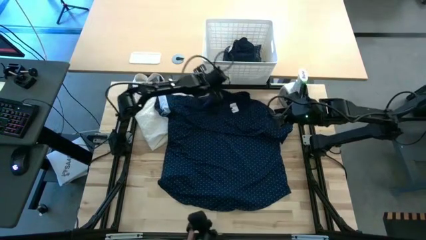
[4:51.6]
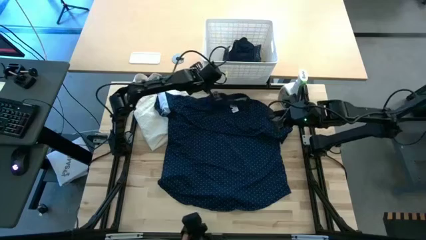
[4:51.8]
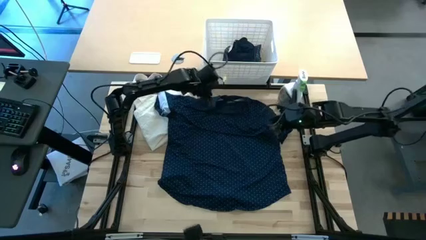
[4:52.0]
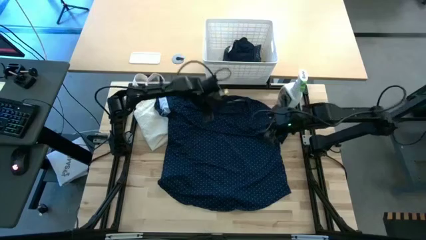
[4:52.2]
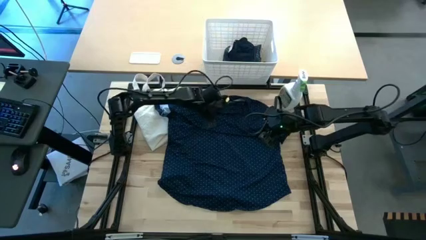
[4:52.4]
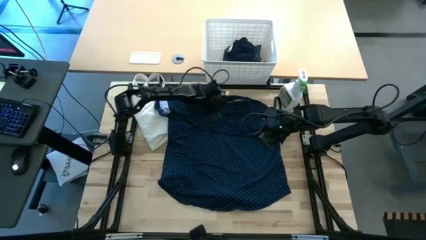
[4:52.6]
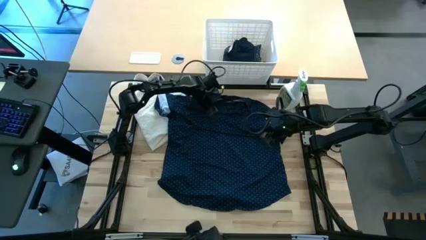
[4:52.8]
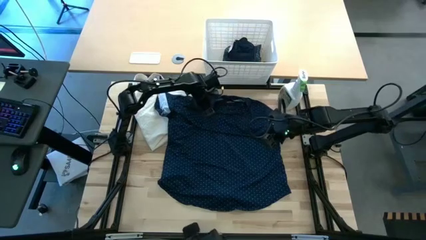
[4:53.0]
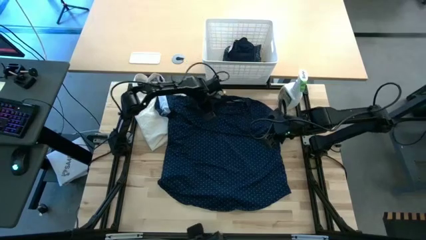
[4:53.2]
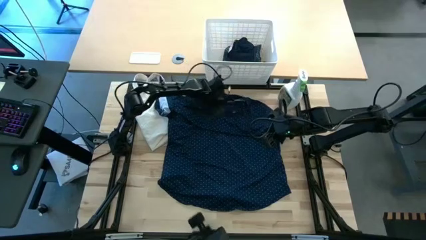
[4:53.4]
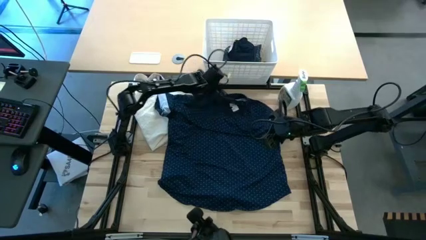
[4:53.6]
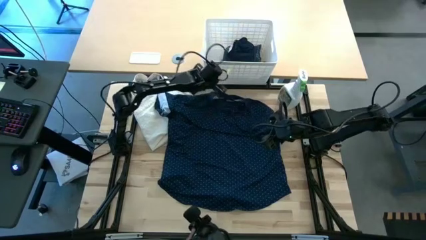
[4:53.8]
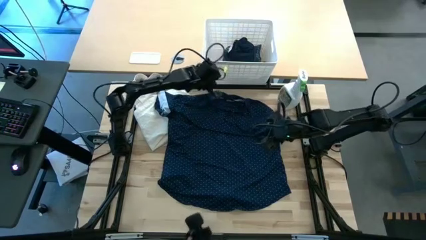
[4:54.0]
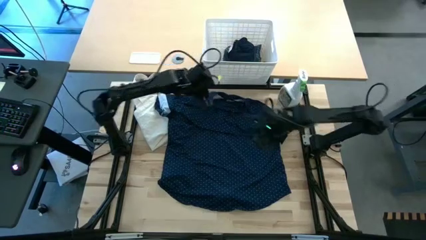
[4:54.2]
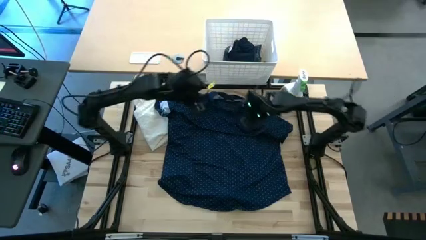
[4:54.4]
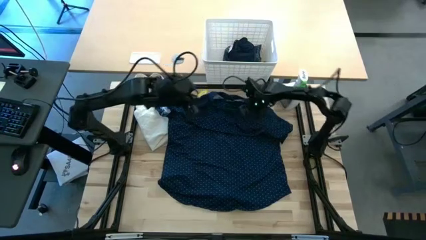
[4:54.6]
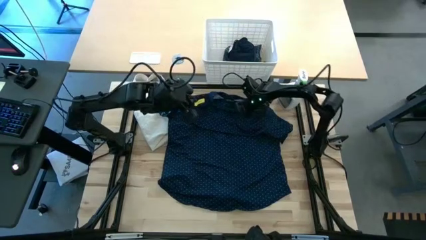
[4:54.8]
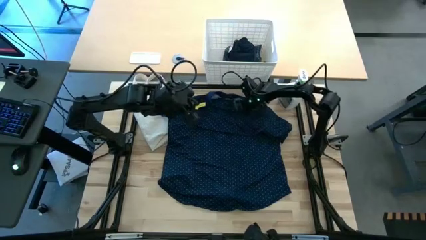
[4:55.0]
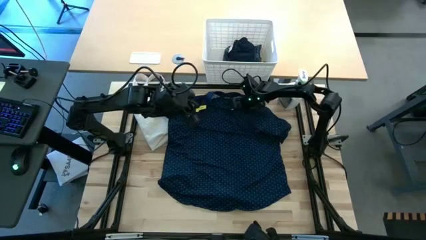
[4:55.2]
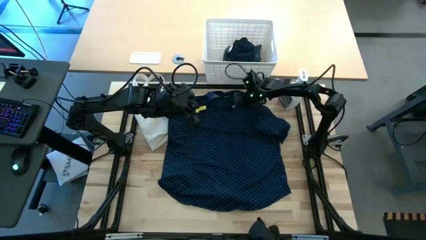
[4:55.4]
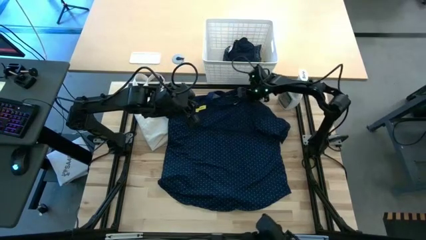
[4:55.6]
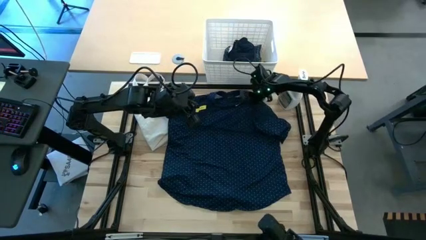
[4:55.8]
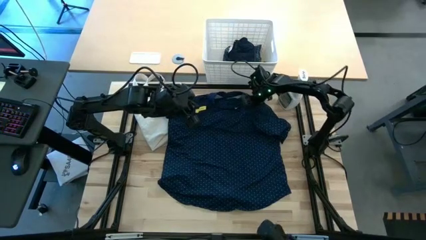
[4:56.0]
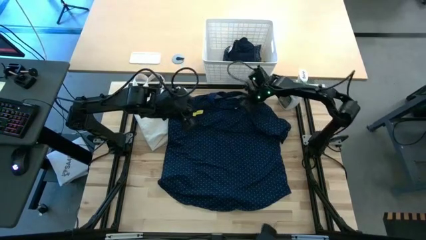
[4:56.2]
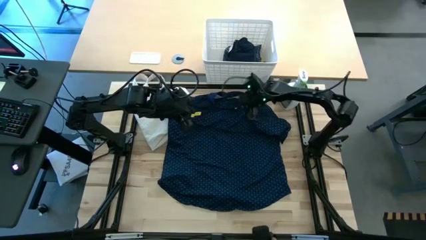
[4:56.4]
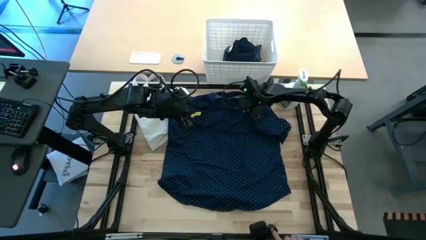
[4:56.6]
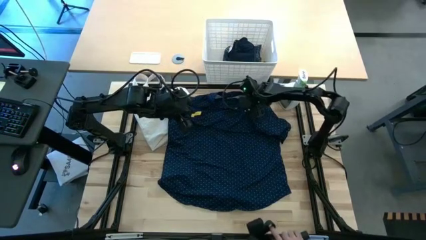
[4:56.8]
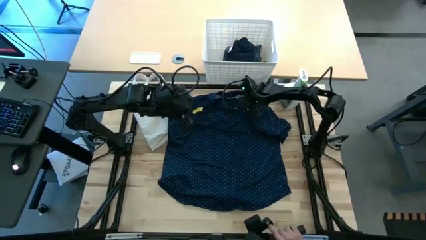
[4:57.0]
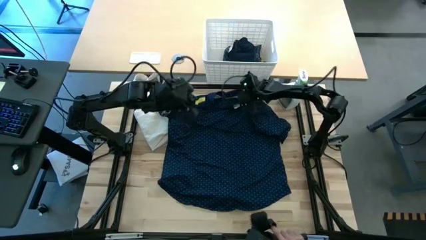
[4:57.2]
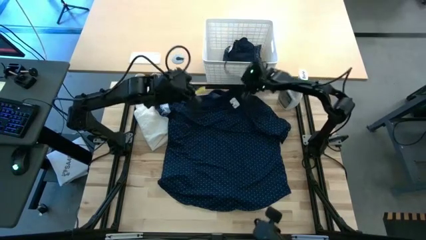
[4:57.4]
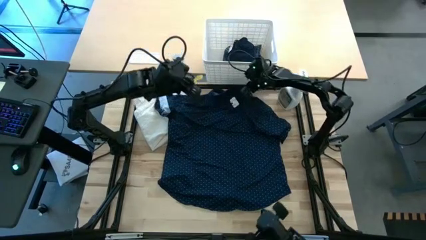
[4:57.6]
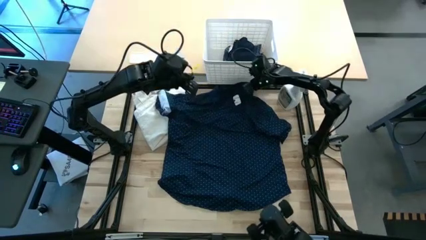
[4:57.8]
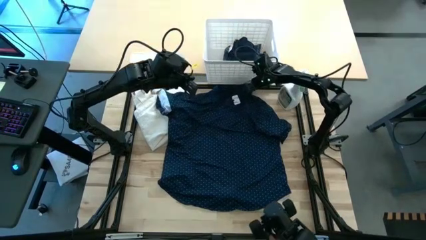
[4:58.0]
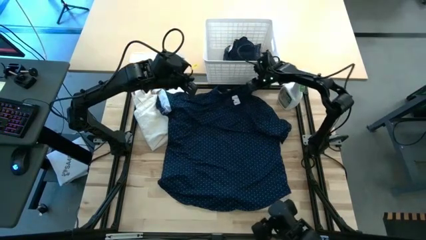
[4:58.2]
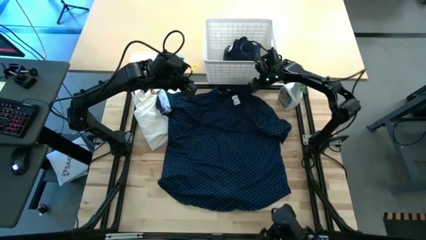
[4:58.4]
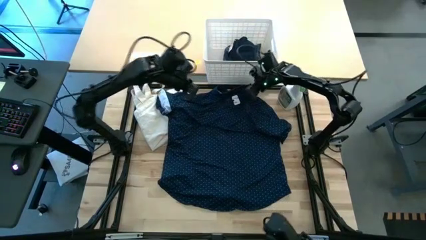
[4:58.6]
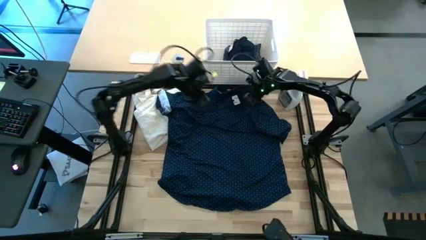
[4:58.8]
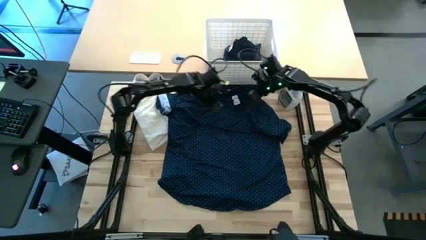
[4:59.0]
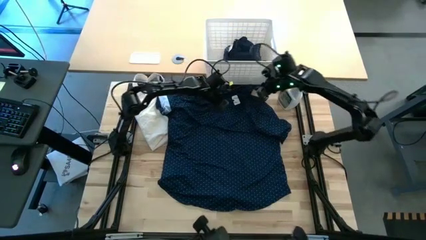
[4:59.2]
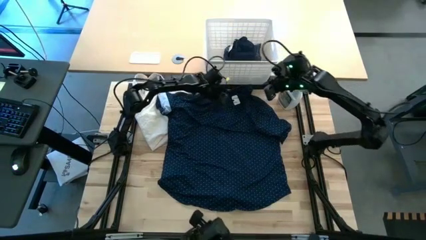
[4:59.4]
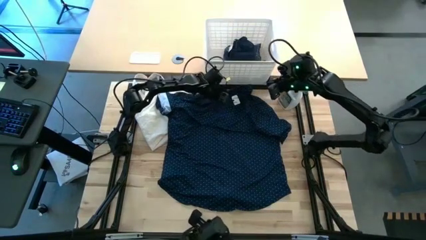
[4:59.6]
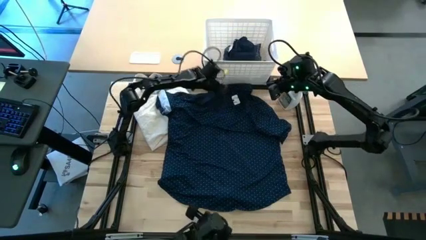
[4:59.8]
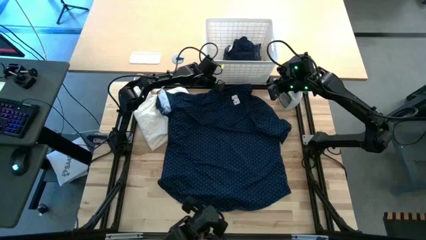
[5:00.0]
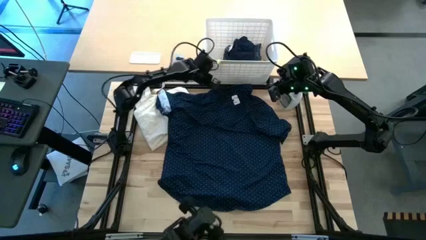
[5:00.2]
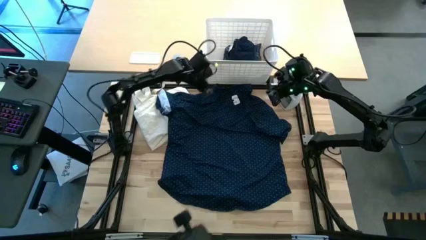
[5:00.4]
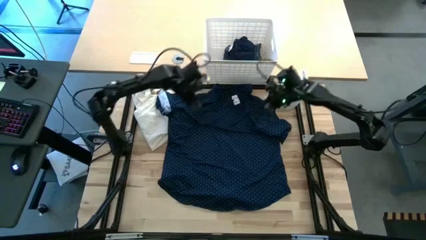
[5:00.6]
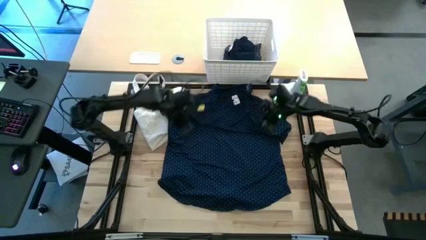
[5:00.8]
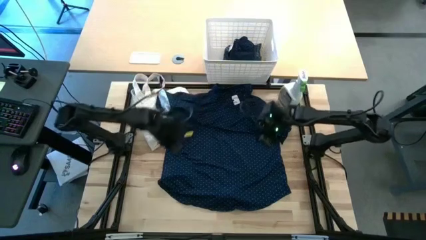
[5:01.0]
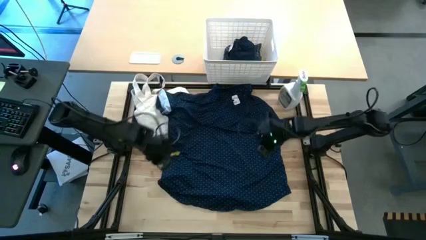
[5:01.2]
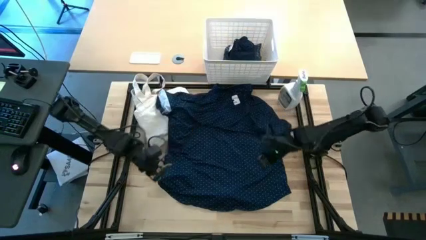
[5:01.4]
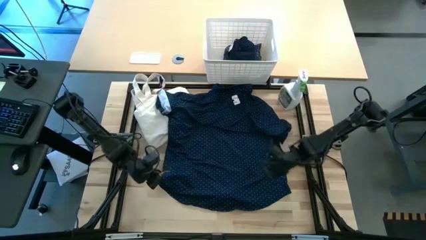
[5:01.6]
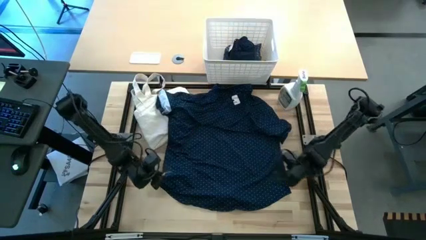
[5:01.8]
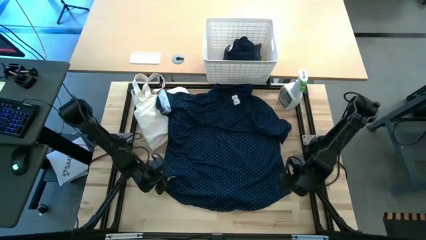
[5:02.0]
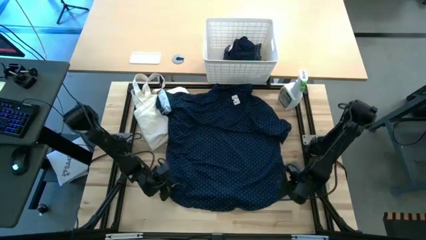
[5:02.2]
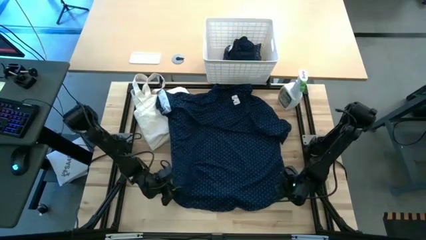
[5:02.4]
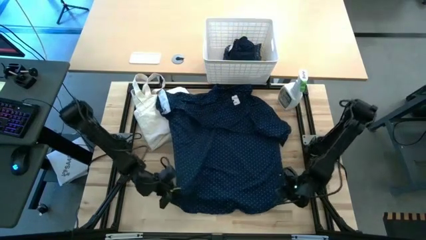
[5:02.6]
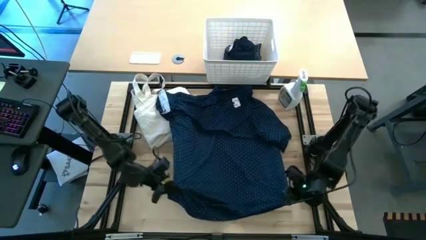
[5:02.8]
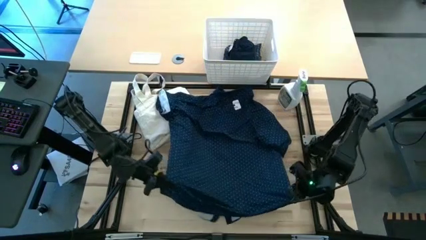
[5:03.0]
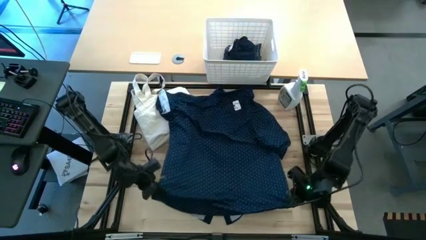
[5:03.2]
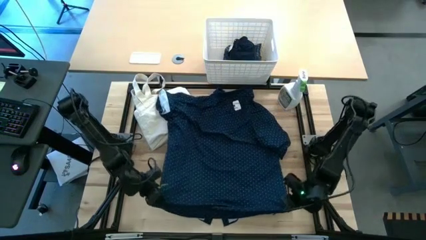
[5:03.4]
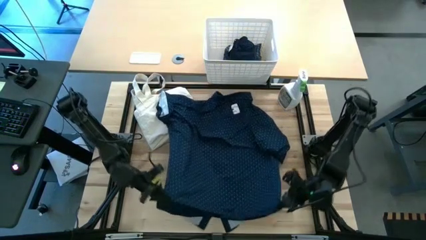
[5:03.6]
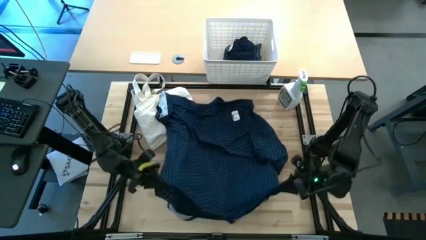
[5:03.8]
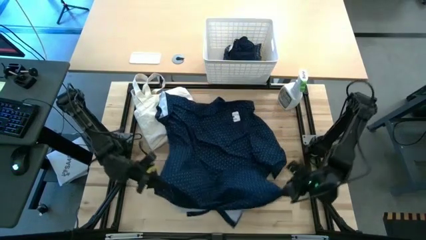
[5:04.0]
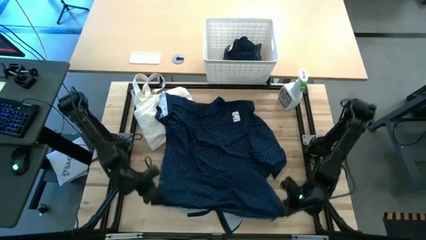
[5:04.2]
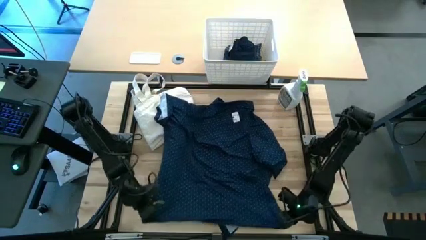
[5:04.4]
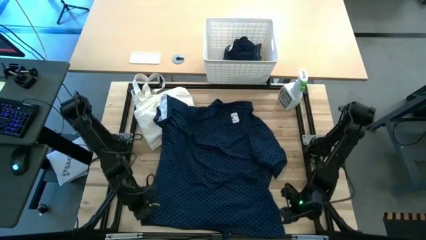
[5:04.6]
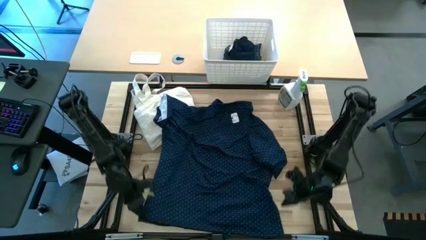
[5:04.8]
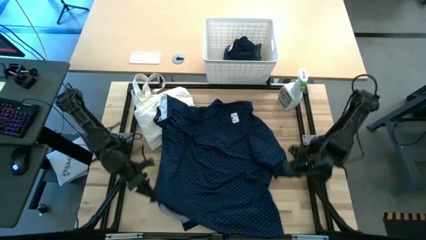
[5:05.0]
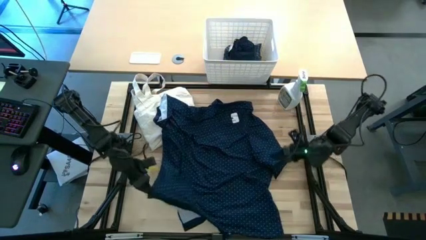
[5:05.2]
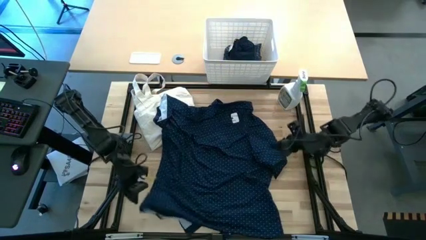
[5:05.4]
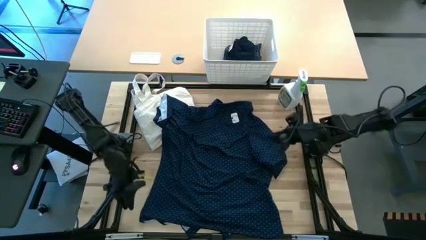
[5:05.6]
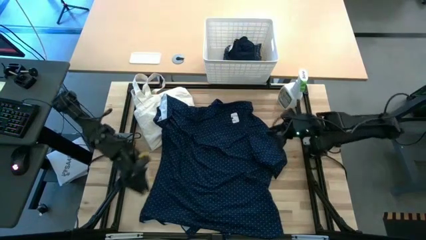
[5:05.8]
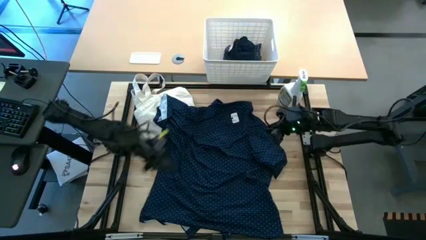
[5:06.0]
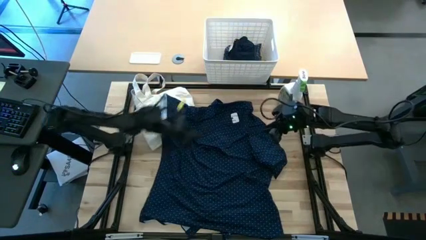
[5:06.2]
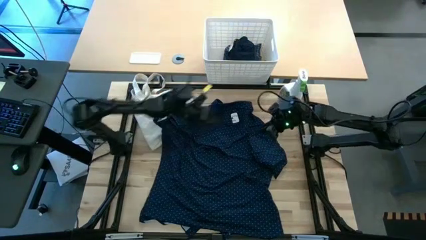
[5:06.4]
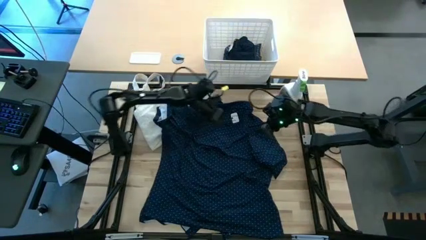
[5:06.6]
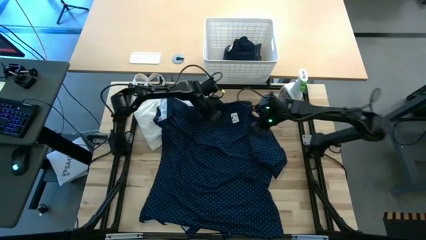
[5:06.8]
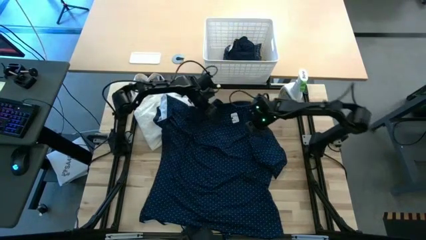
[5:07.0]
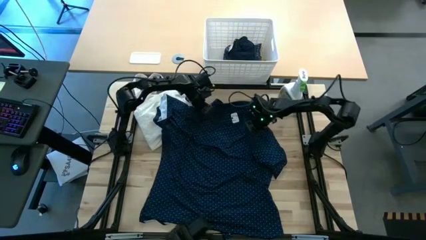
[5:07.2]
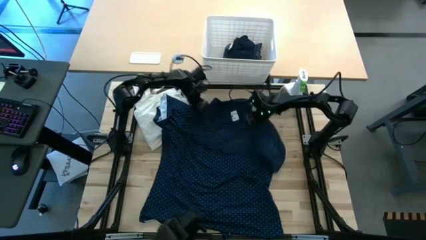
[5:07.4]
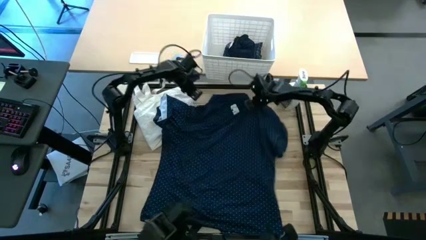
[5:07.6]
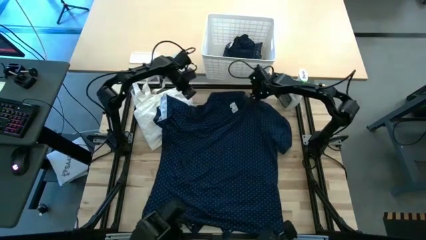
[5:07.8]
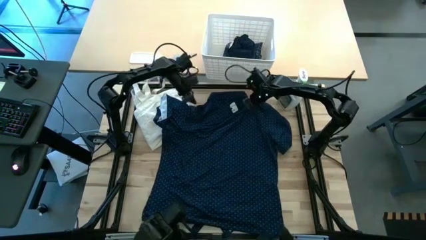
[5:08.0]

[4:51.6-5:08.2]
Fold the blue polo shirt
